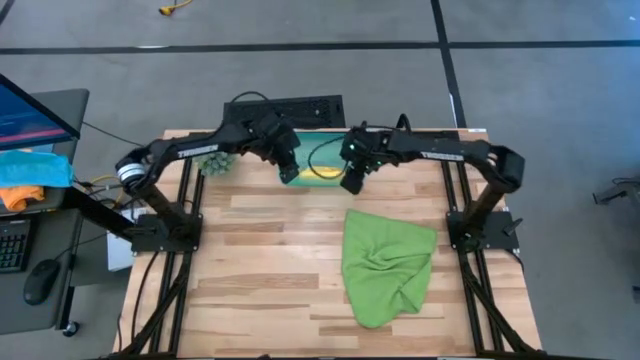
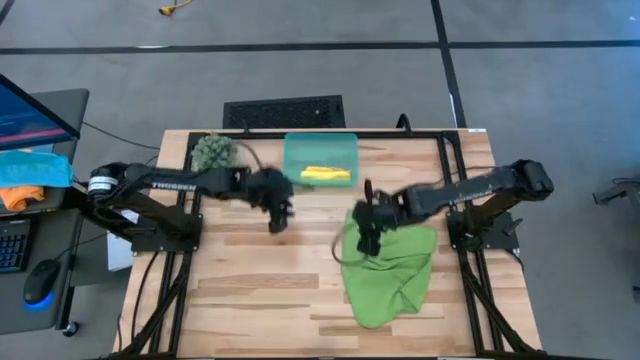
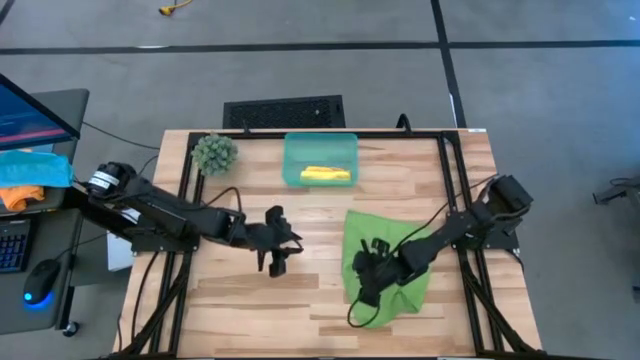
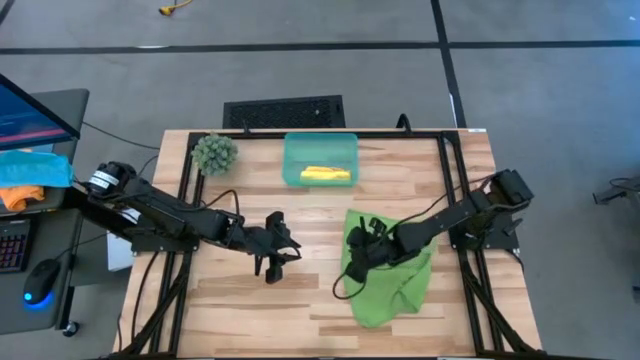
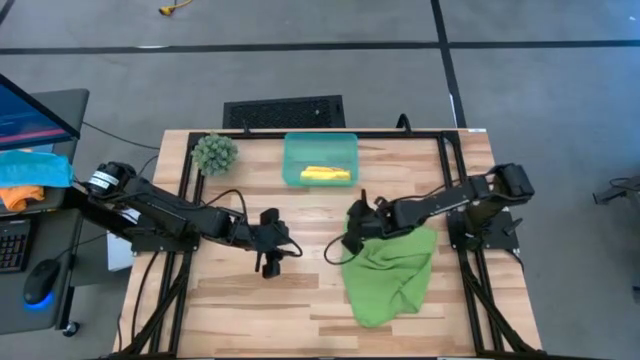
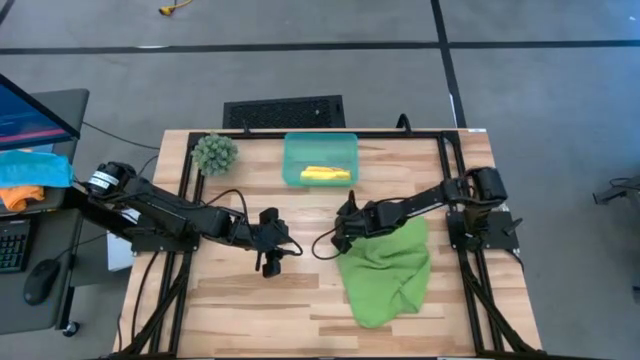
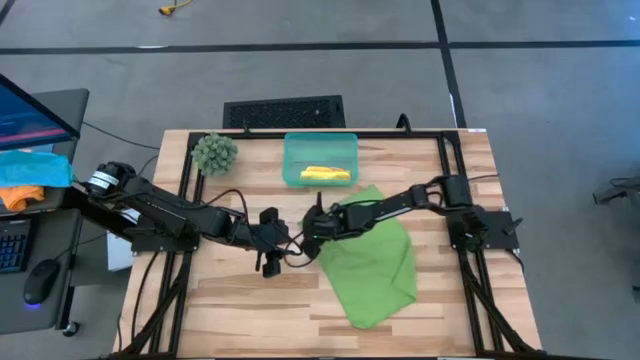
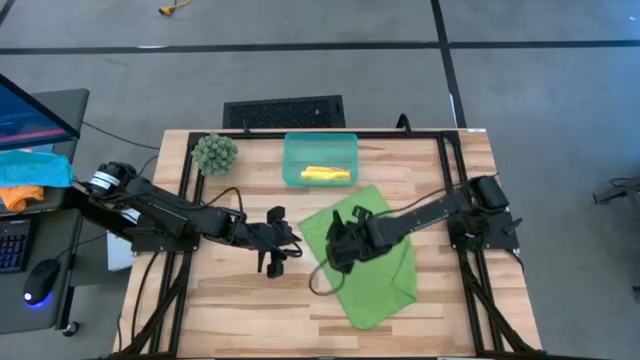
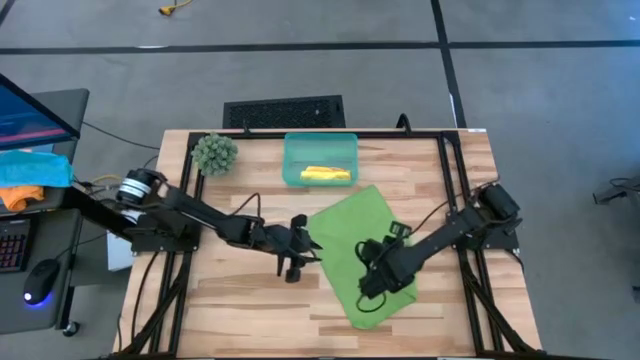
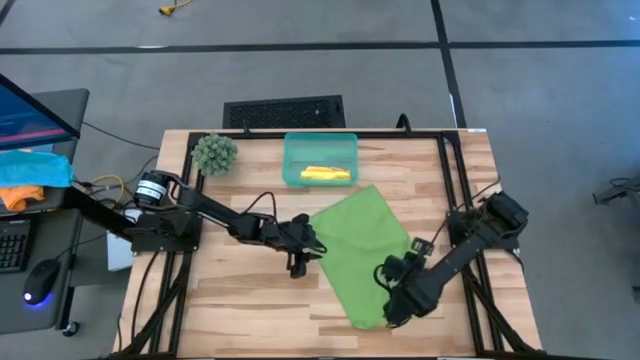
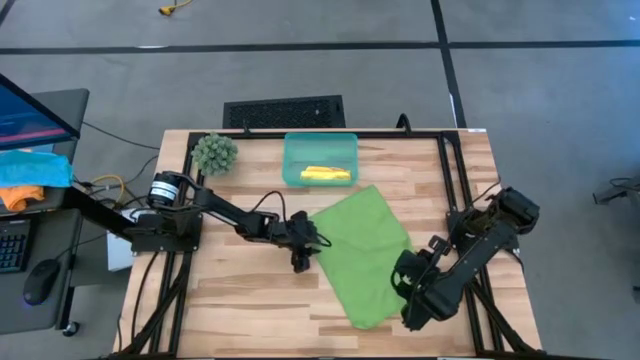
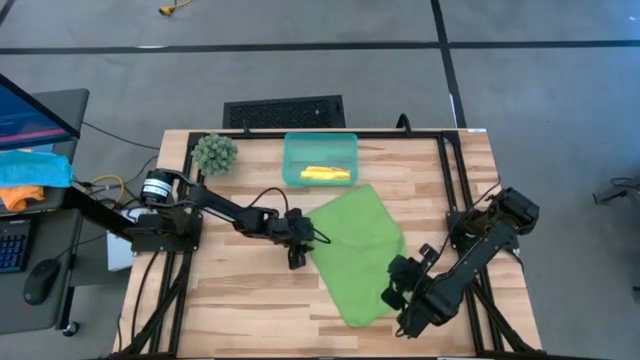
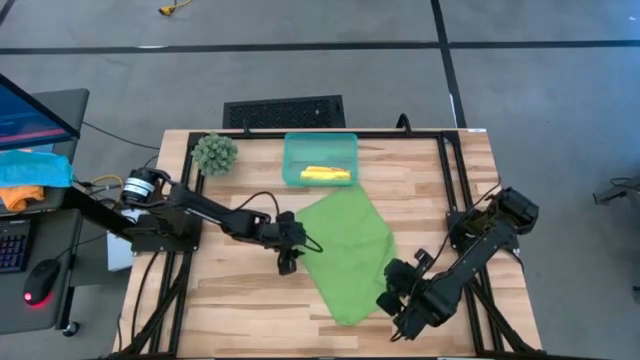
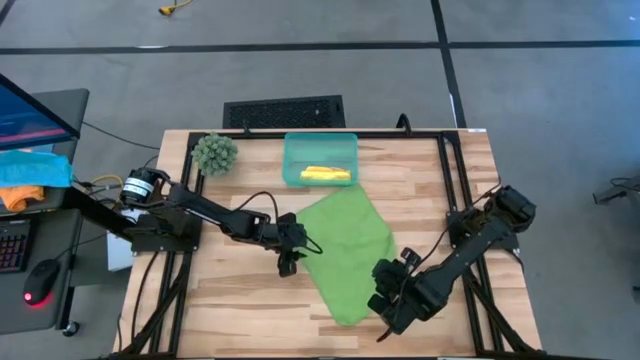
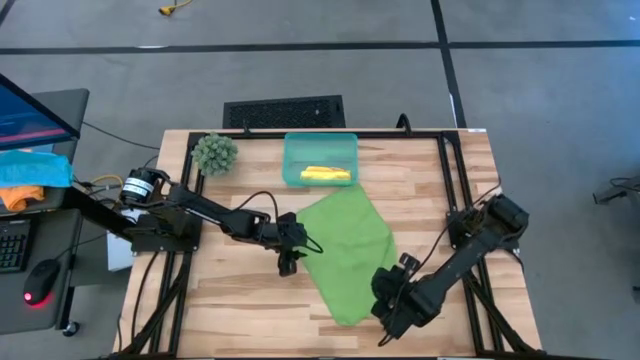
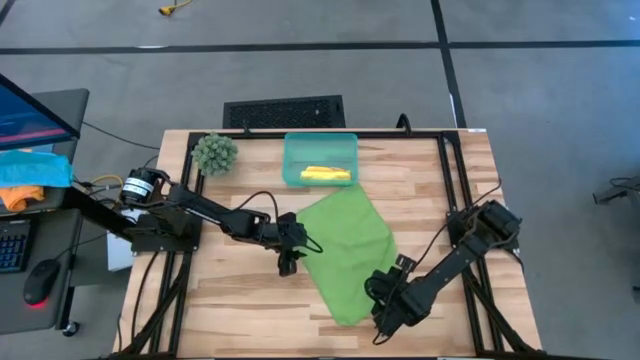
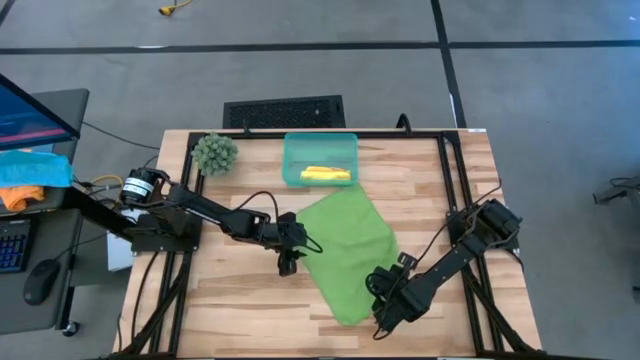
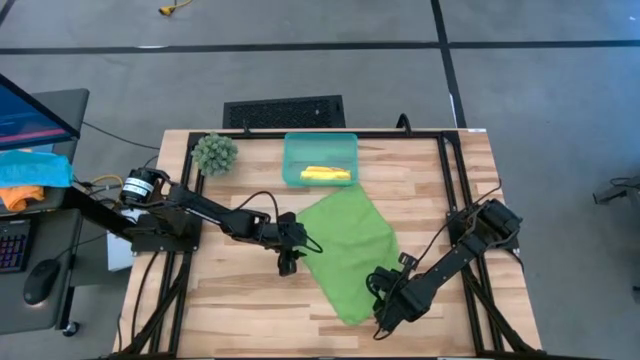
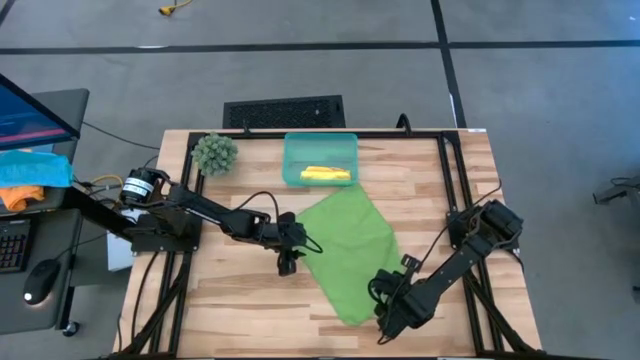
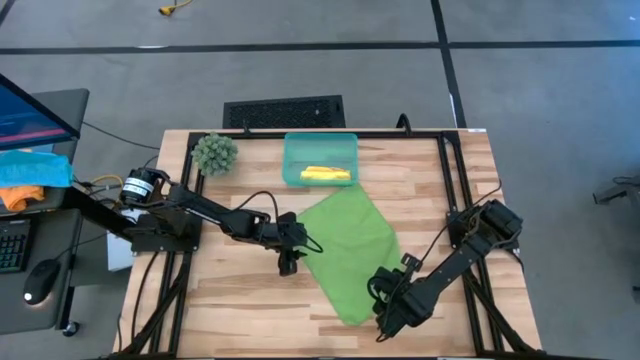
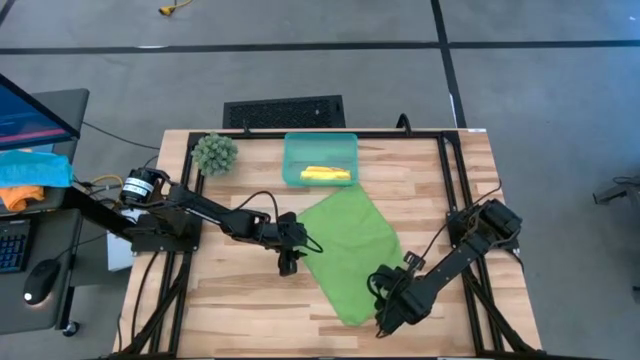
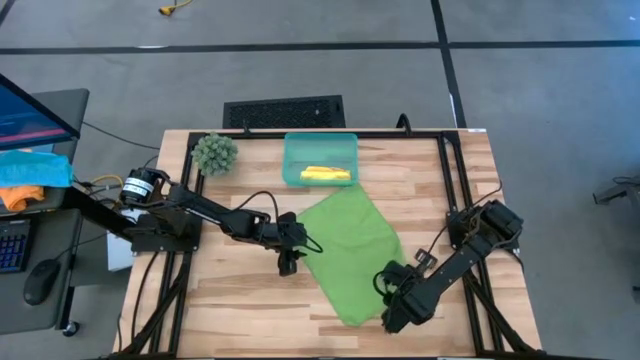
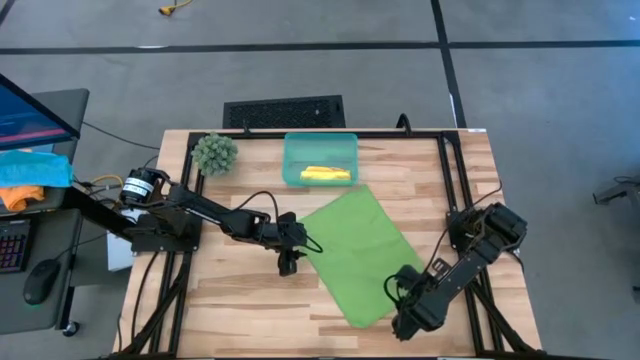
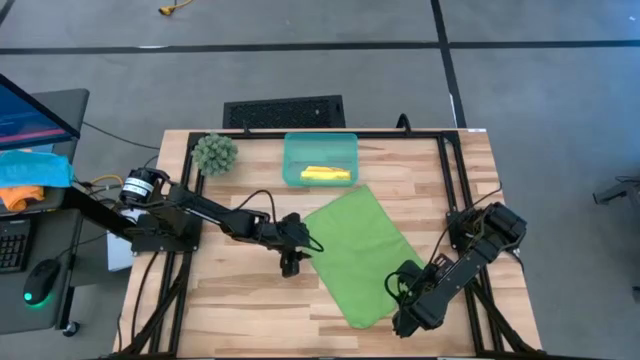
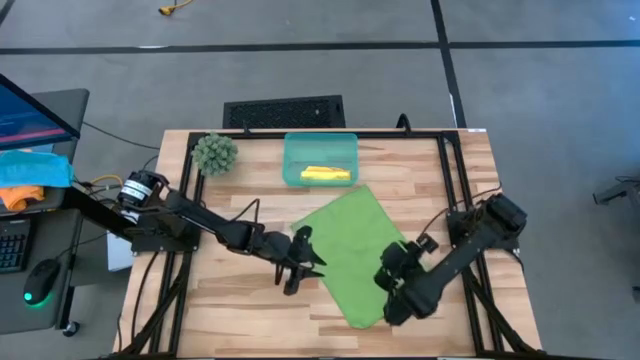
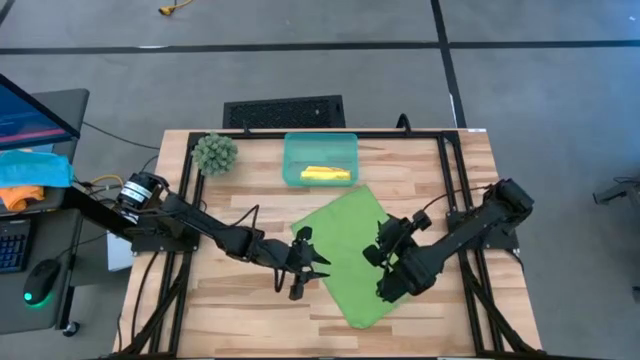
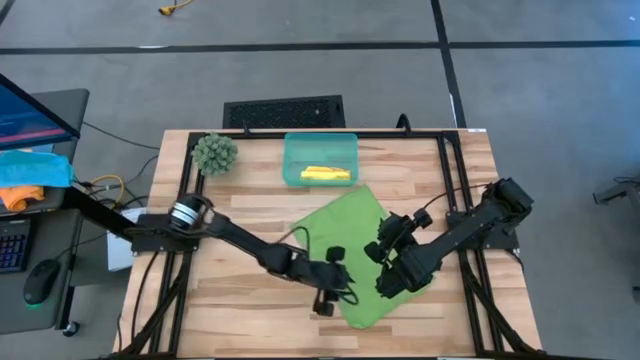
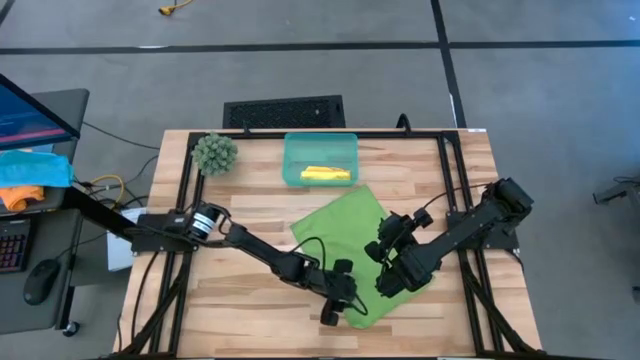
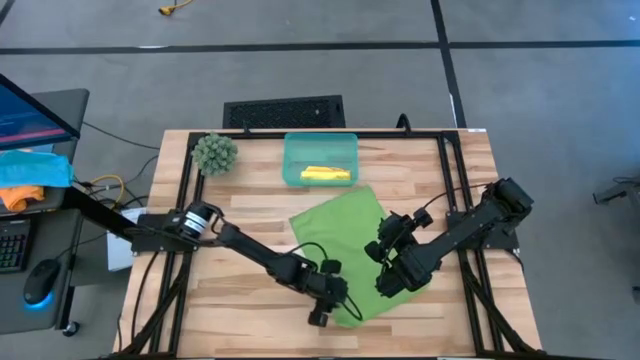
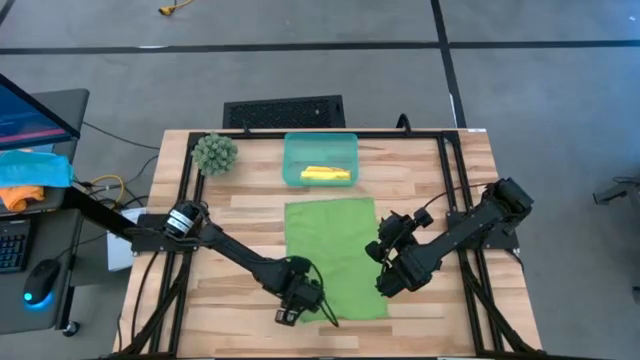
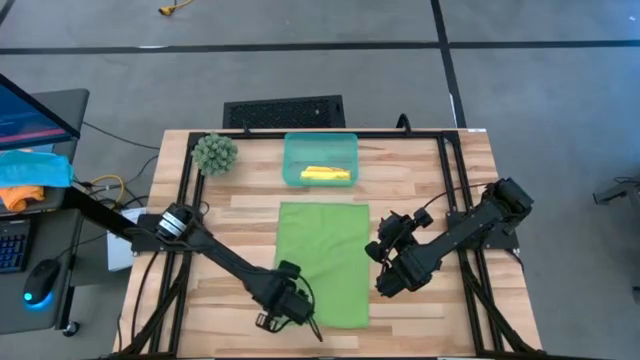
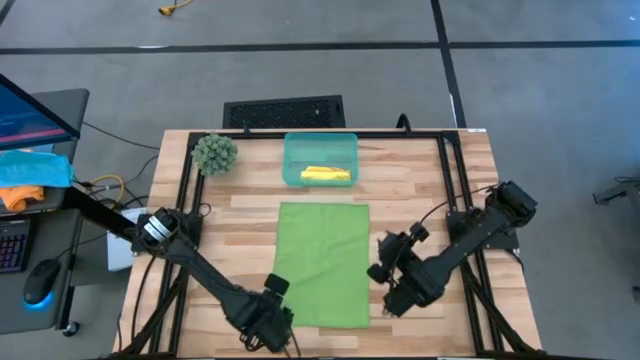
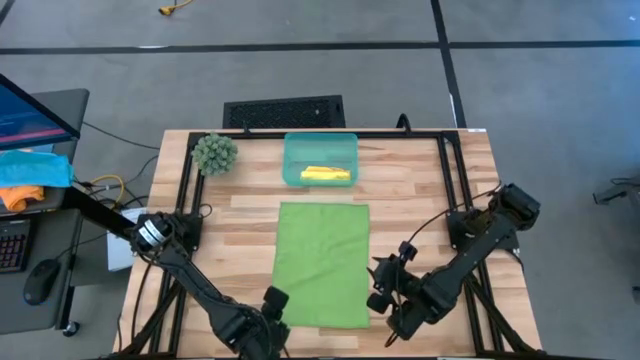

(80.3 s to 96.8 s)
Task: Roll microfiber towels into tight, uniform cylinder then place into a basket
Fold the green microfiber cloth
